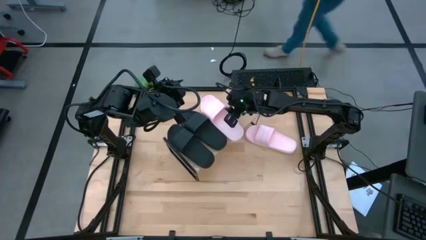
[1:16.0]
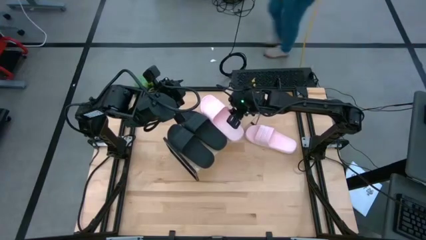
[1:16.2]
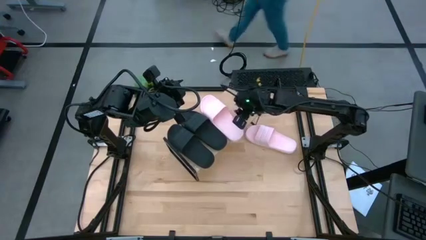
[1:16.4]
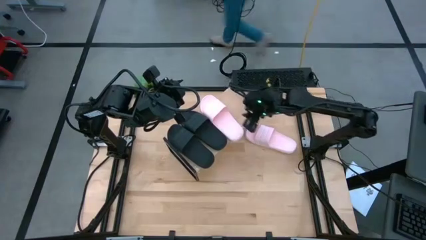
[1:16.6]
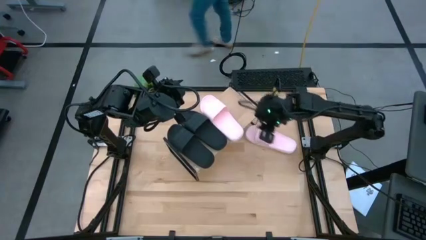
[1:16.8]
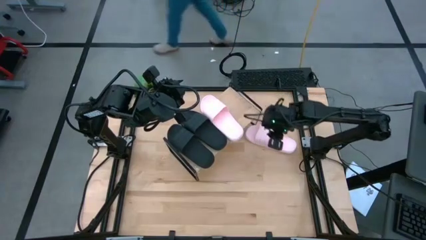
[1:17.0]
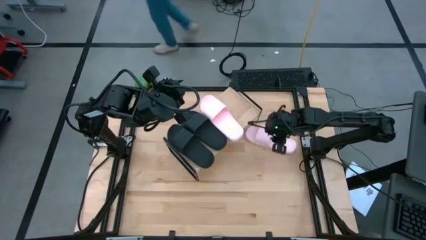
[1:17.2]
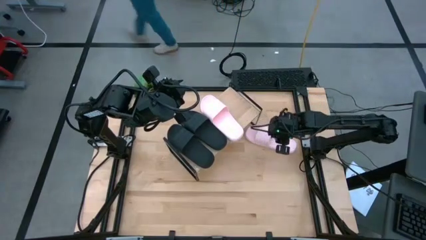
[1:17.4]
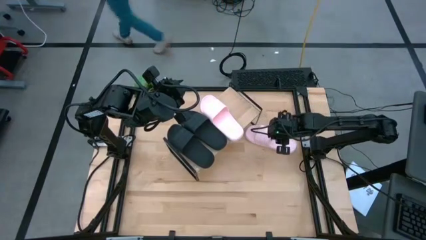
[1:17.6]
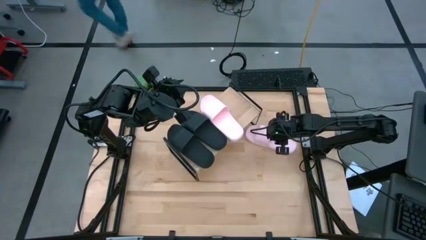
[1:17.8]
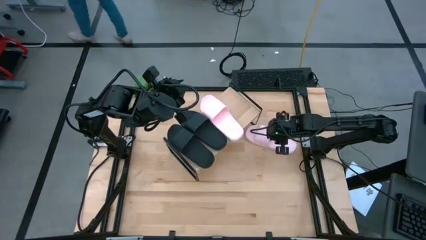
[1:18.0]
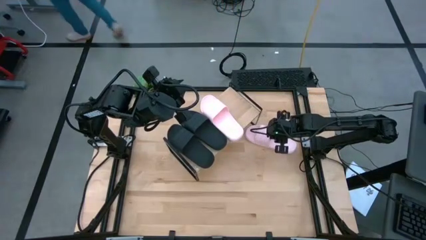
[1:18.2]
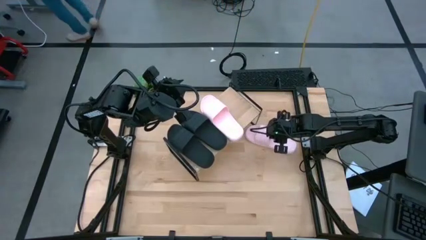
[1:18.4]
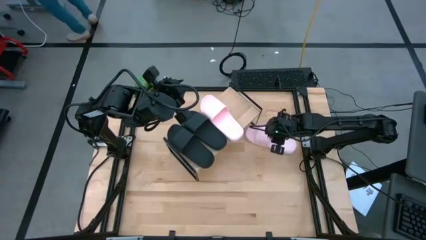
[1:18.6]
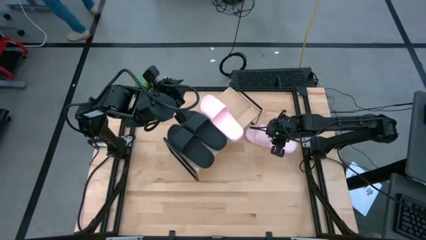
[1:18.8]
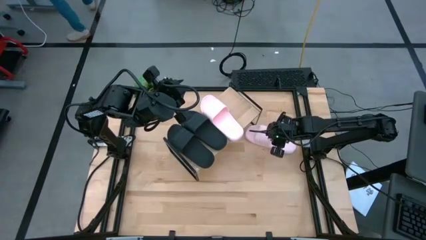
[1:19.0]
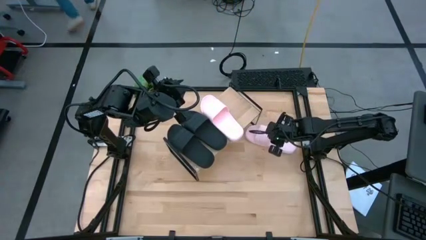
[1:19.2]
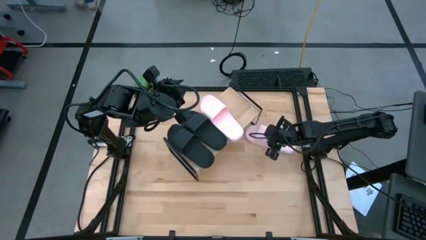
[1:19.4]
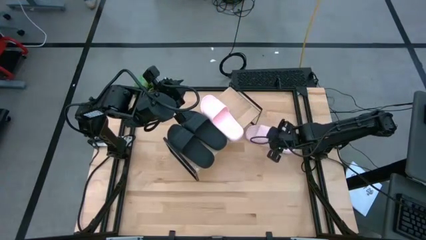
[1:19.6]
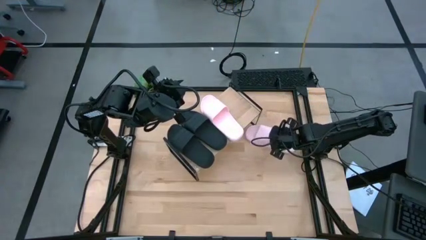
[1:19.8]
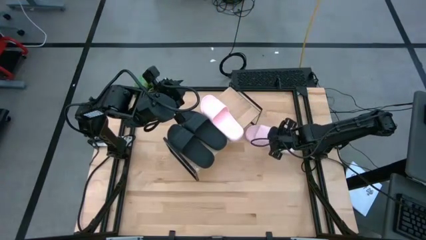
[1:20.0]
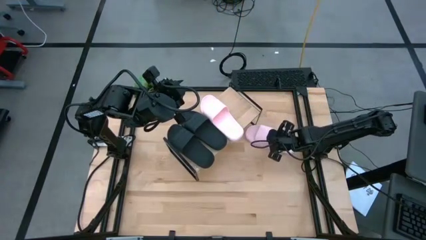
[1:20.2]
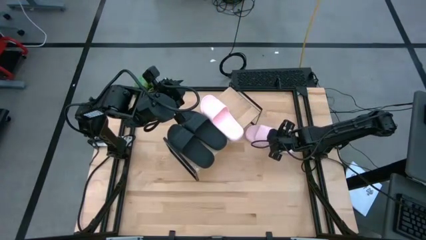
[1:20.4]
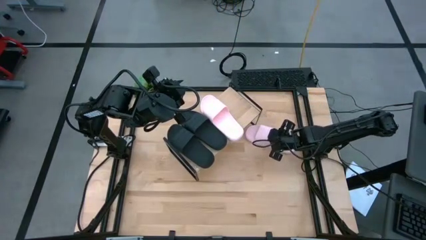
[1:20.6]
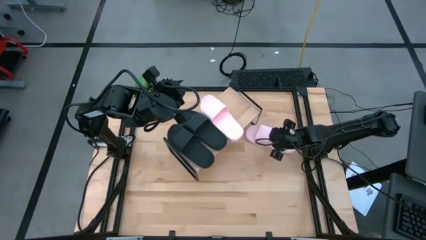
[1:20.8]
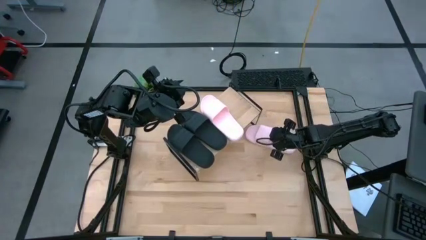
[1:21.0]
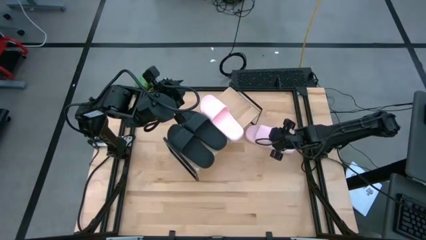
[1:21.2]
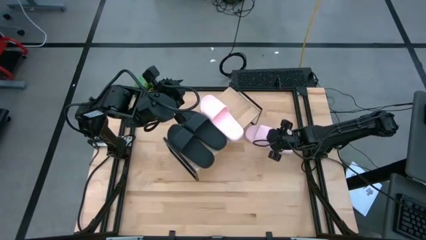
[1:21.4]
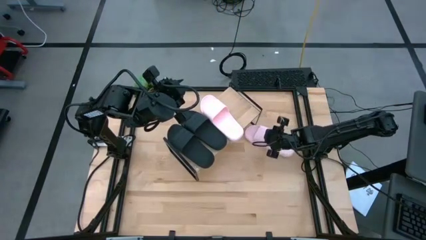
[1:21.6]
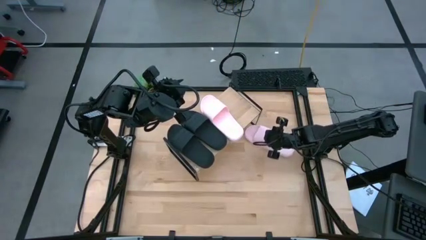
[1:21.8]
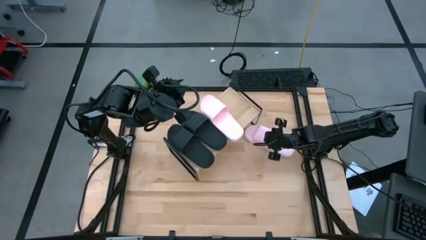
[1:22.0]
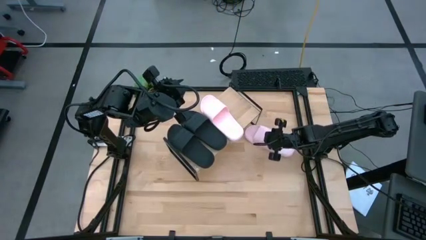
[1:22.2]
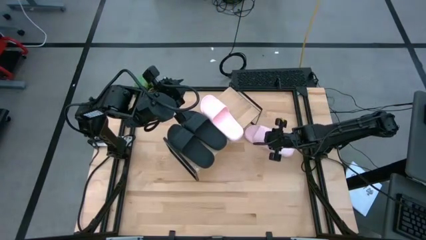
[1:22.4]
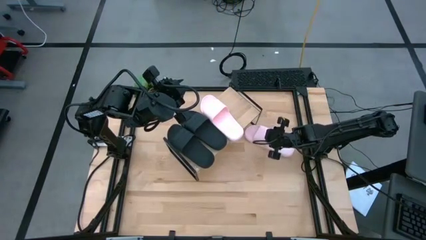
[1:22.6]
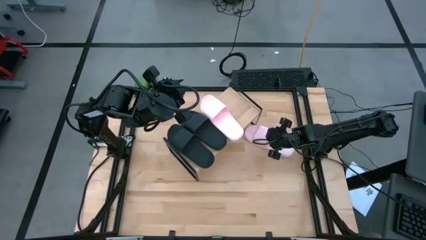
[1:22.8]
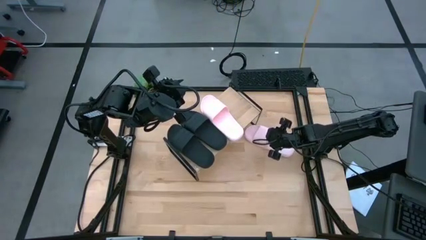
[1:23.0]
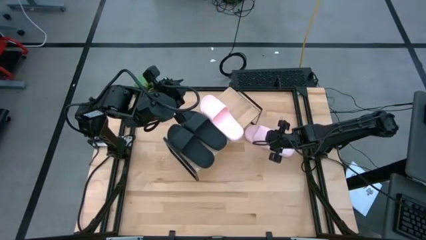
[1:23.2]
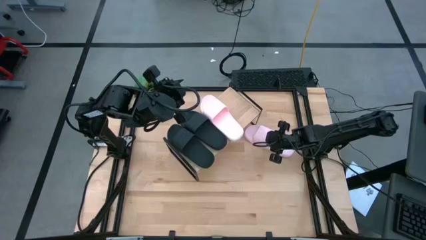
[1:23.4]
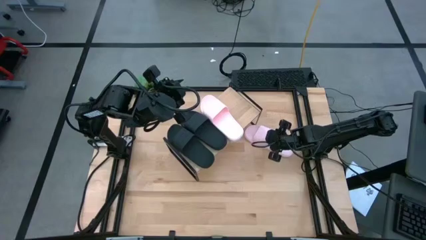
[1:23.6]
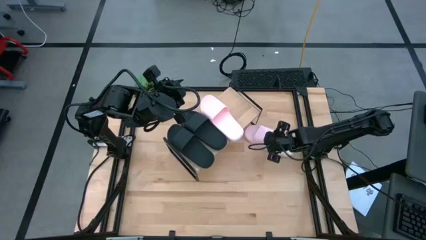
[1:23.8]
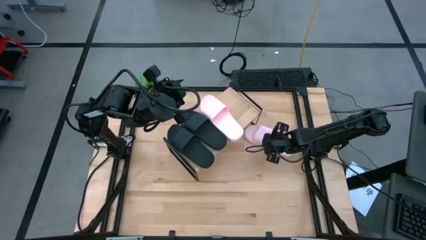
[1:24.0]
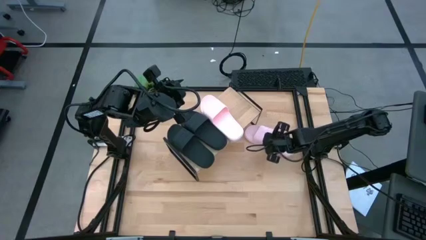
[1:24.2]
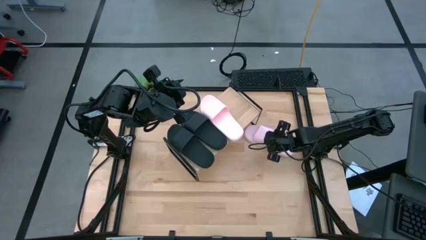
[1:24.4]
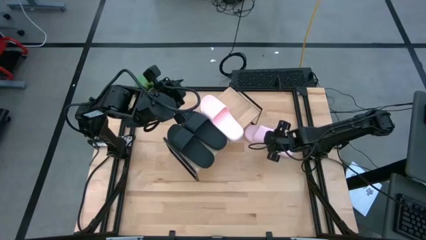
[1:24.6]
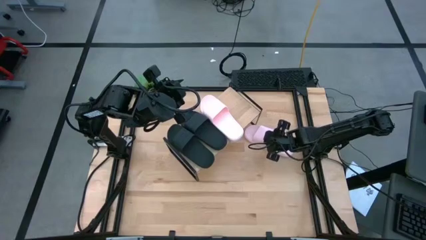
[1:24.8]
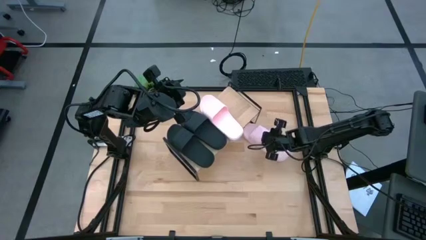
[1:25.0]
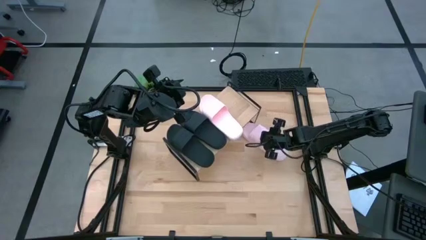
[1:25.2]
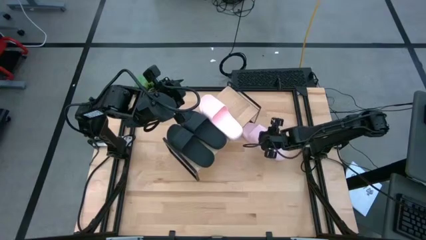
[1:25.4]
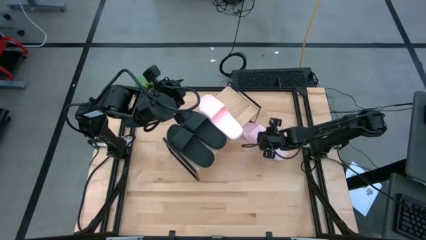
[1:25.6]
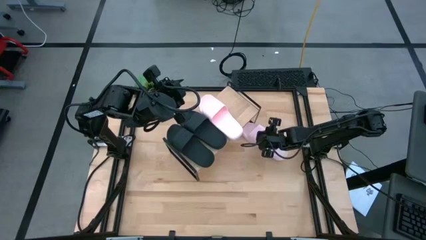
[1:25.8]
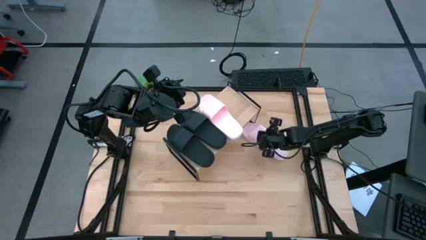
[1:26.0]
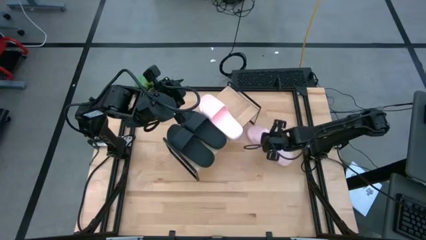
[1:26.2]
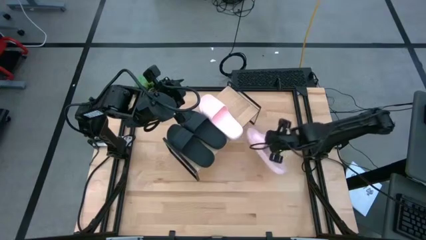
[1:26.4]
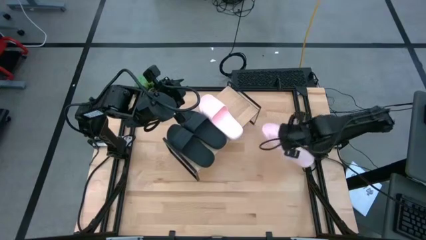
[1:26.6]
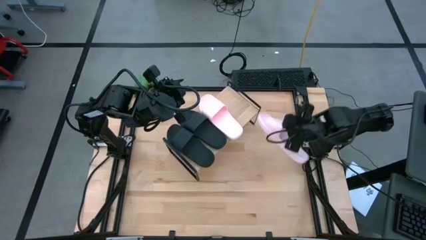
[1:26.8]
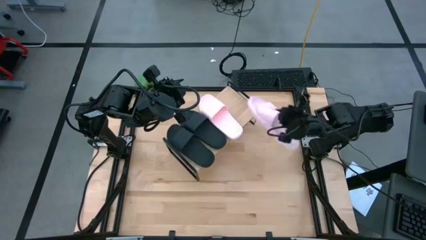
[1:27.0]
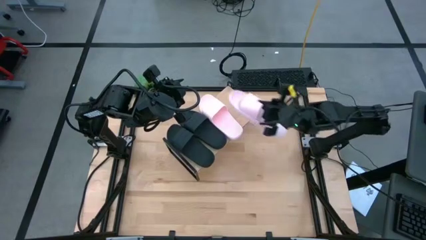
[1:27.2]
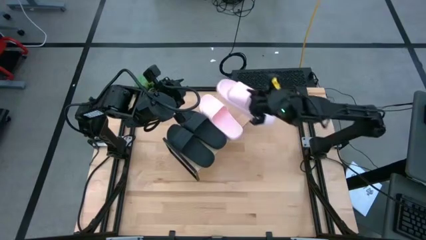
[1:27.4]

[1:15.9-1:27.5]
Task: Pick and place slides into the shelf
Put the pink slide on the shelf
